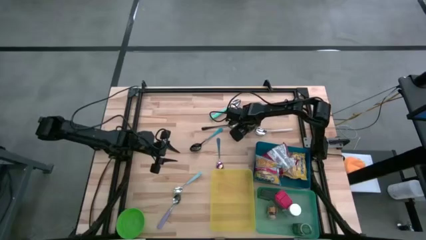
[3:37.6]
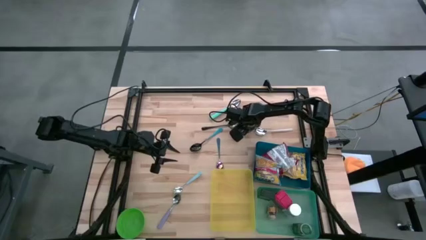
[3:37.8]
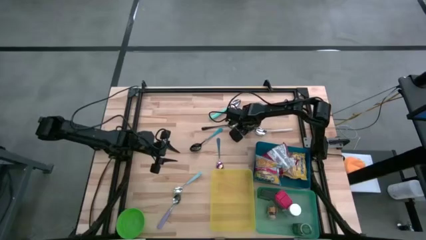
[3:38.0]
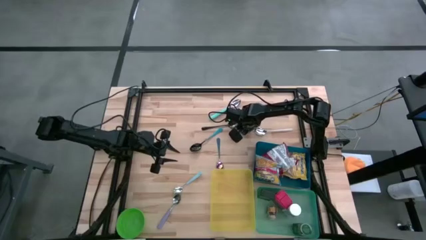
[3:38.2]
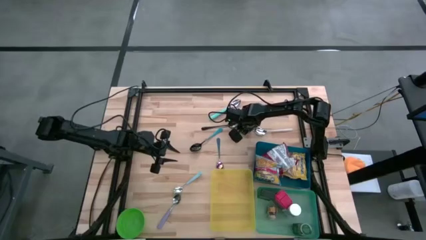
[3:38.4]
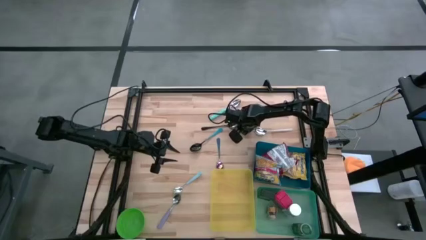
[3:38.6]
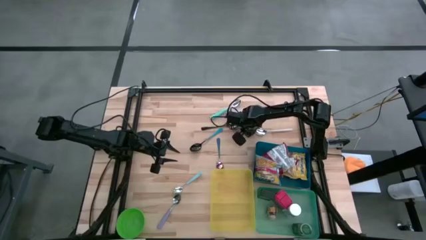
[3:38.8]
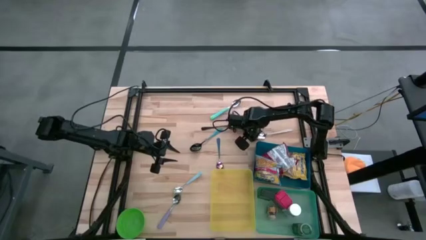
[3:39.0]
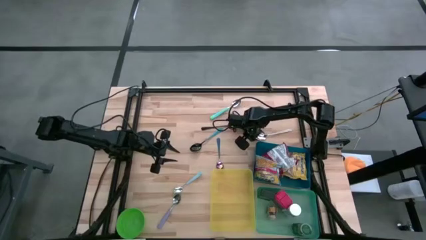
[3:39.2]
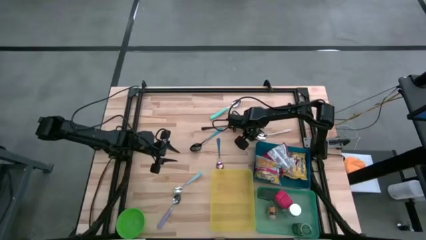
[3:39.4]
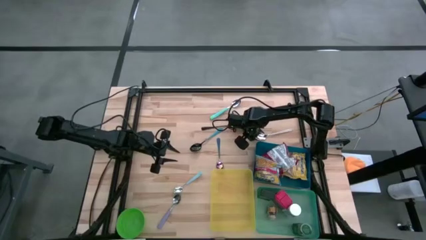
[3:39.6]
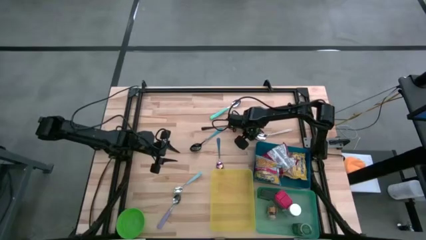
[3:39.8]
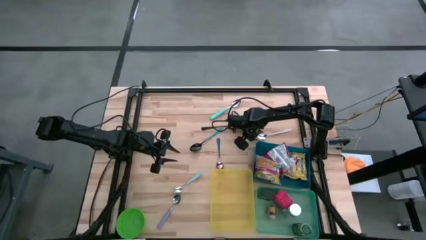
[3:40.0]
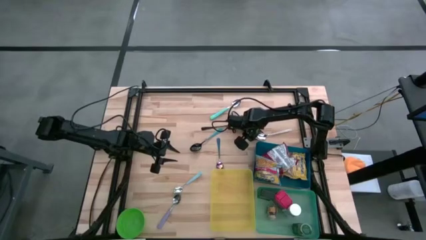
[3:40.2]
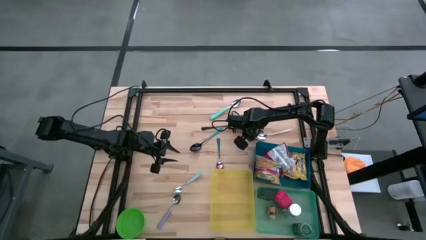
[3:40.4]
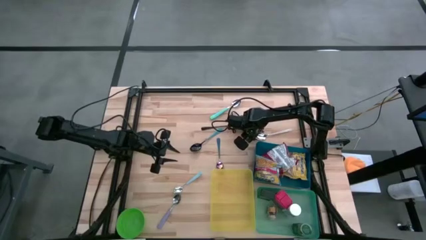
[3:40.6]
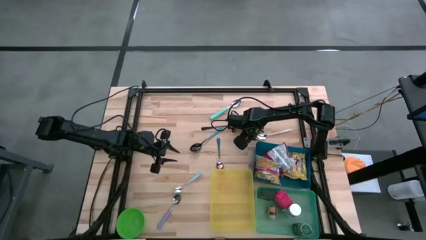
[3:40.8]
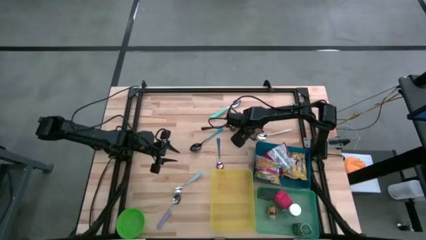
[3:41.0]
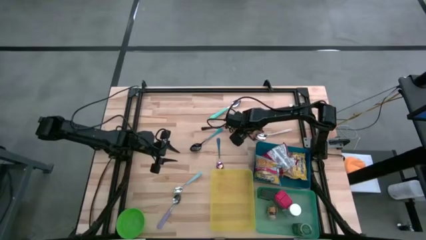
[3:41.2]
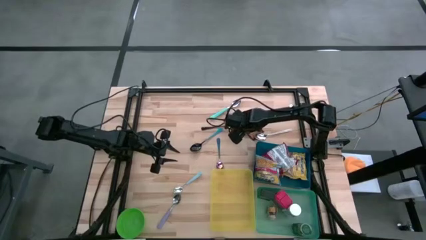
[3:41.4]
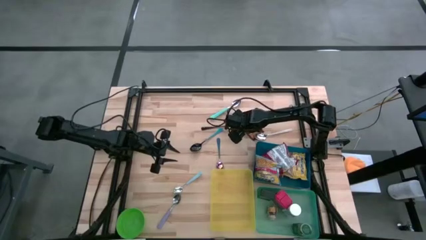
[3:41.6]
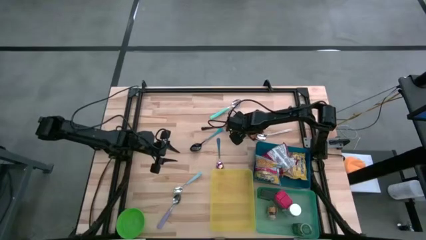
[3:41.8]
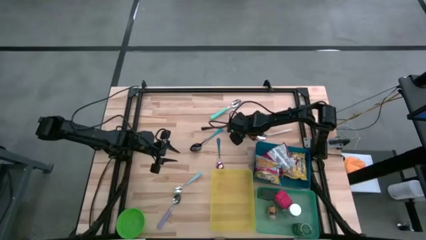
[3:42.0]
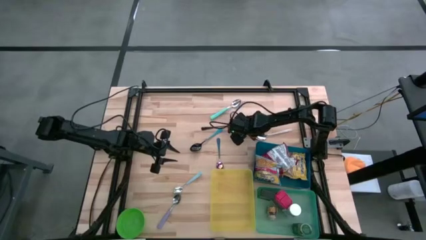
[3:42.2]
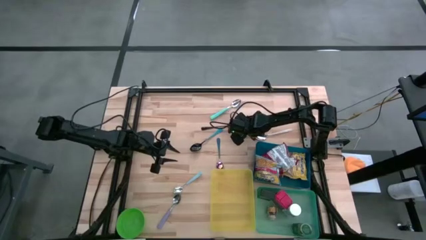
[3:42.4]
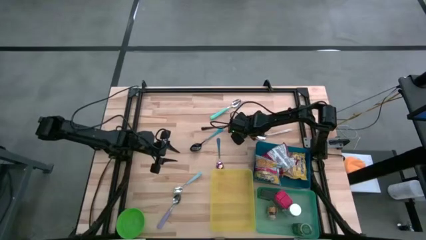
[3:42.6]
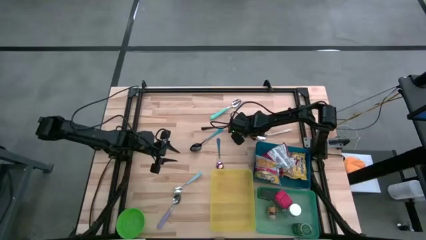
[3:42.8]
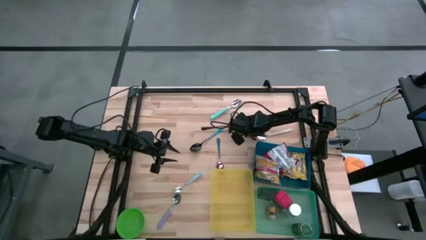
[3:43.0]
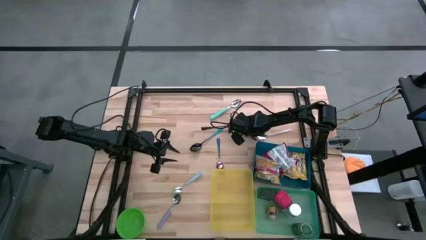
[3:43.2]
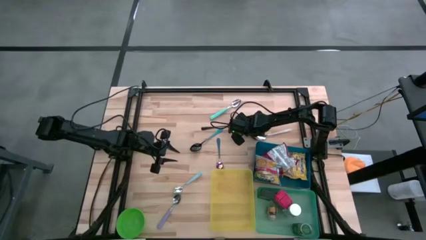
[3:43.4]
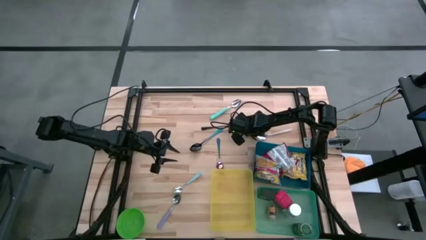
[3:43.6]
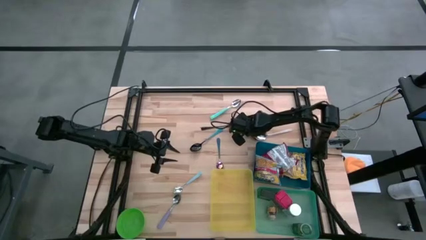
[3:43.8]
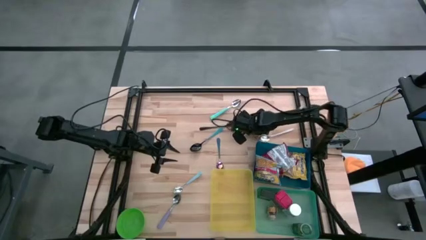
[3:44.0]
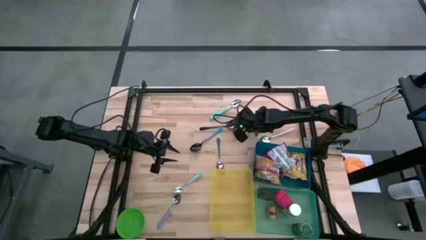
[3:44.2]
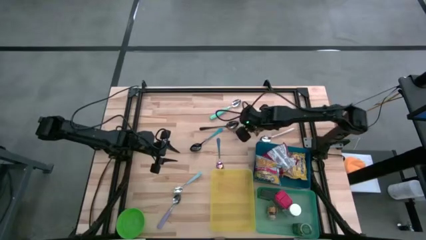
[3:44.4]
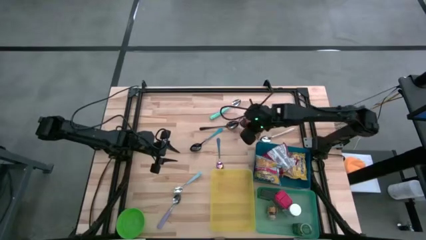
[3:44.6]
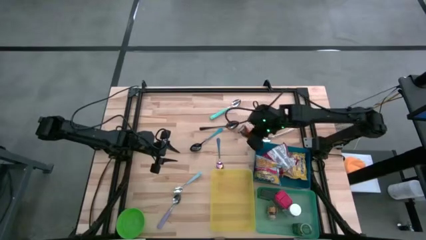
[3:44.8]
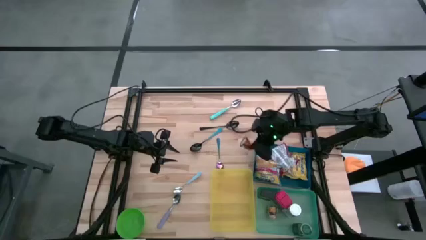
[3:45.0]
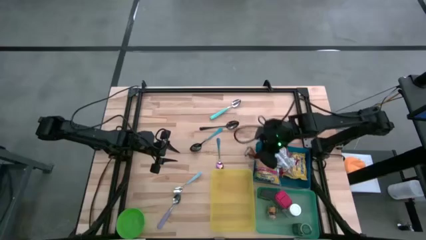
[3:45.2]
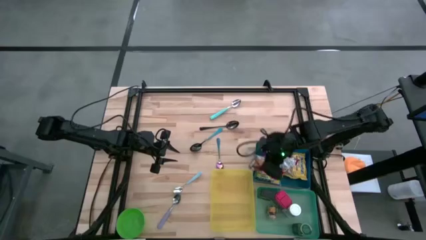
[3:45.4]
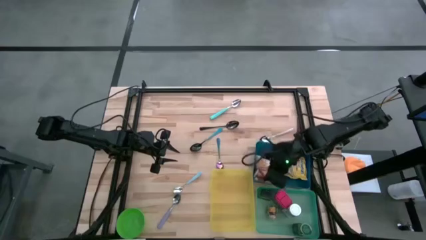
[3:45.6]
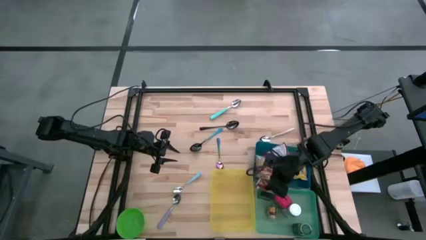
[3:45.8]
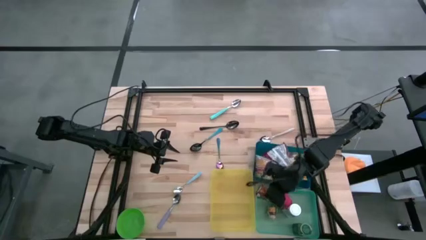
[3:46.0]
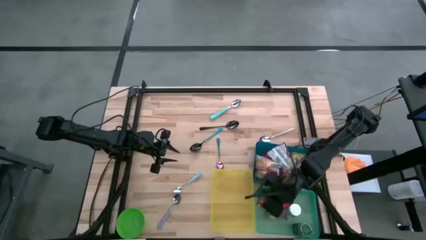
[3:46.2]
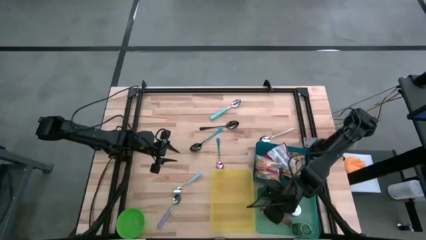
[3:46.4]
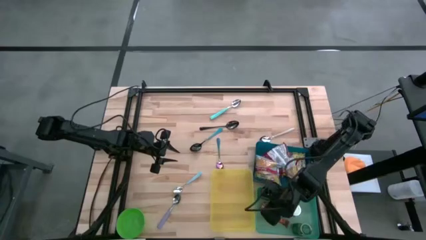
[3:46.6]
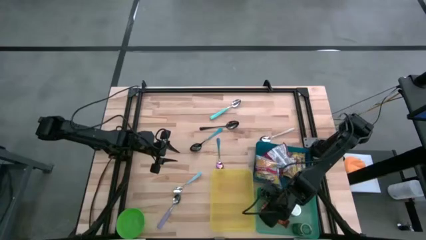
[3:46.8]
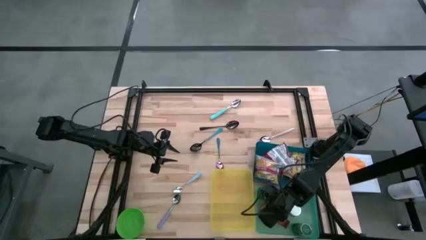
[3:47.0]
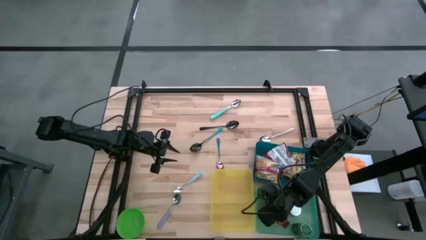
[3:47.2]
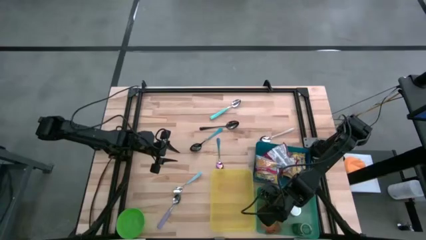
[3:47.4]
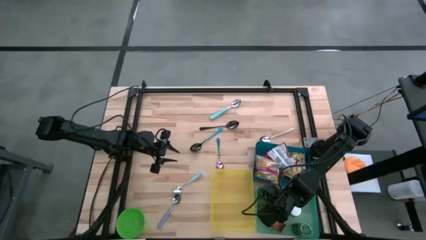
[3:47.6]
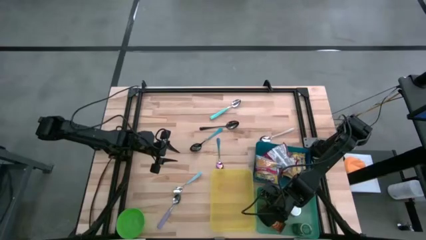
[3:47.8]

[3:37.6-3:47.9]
Put the orange seasoning pack into the green bin
